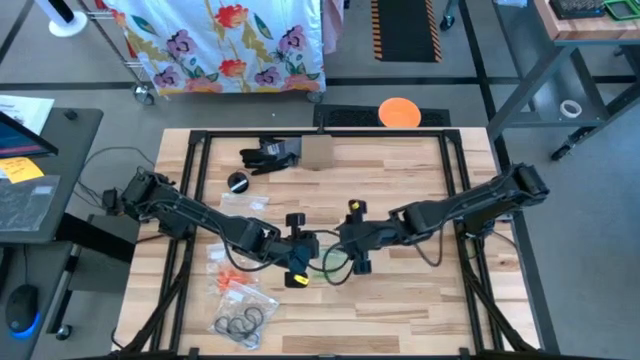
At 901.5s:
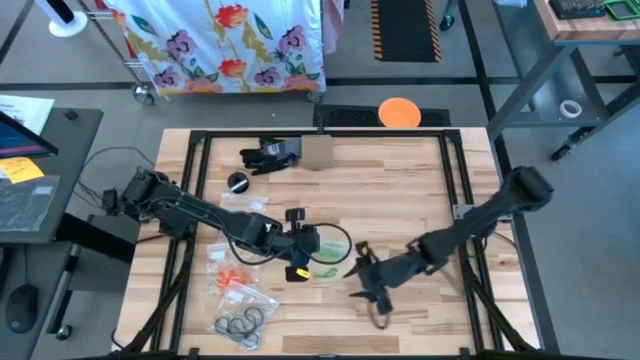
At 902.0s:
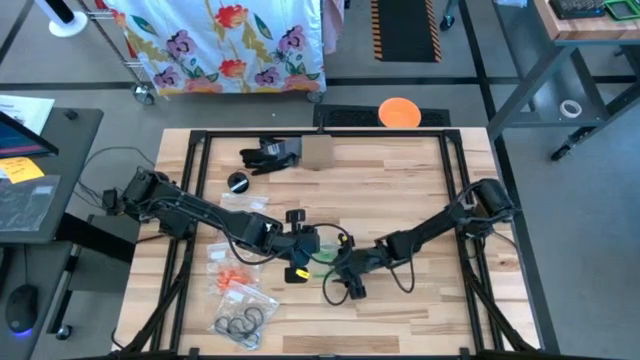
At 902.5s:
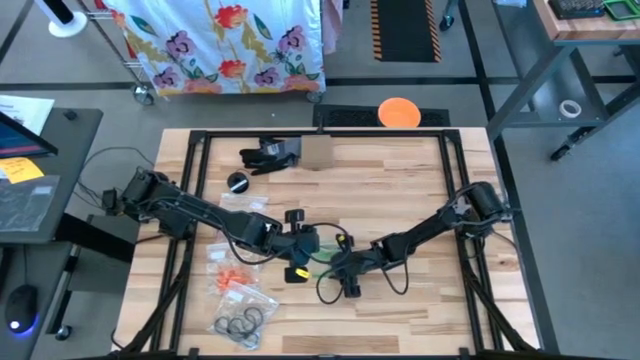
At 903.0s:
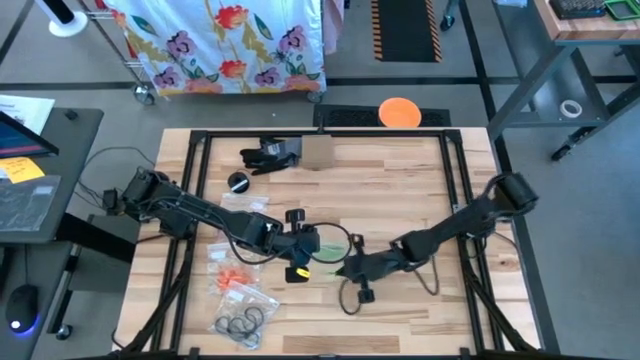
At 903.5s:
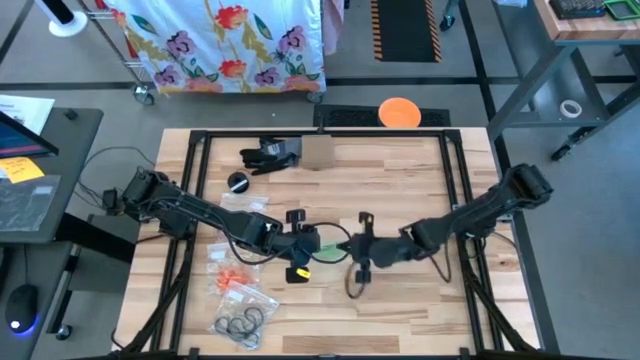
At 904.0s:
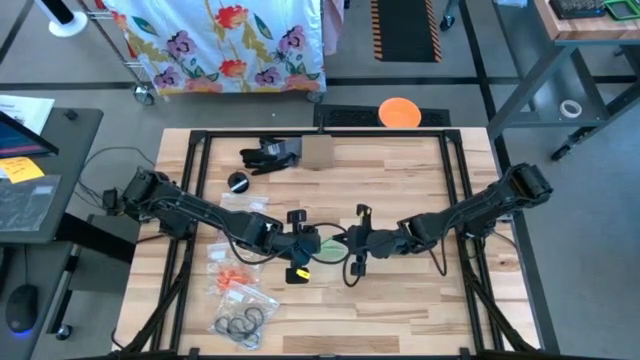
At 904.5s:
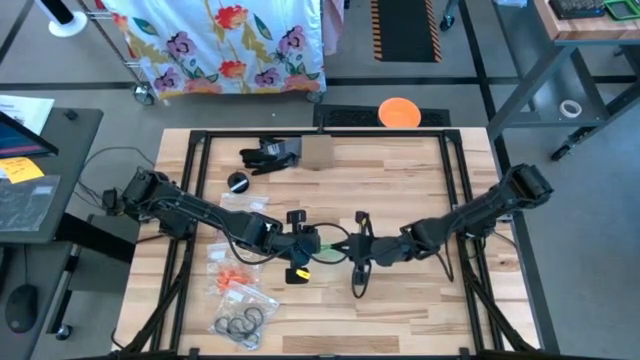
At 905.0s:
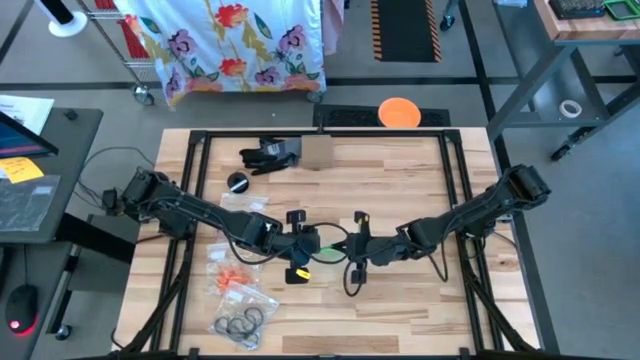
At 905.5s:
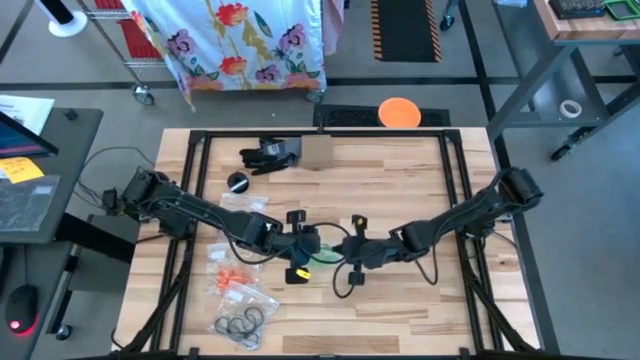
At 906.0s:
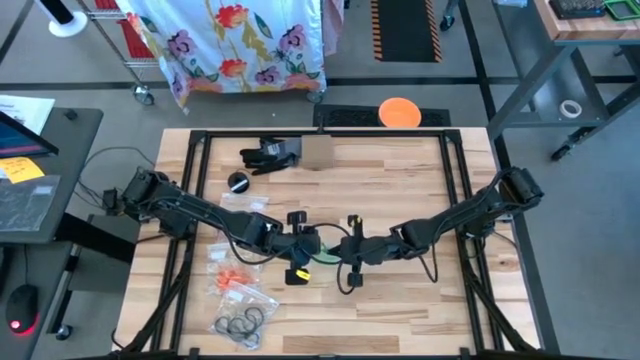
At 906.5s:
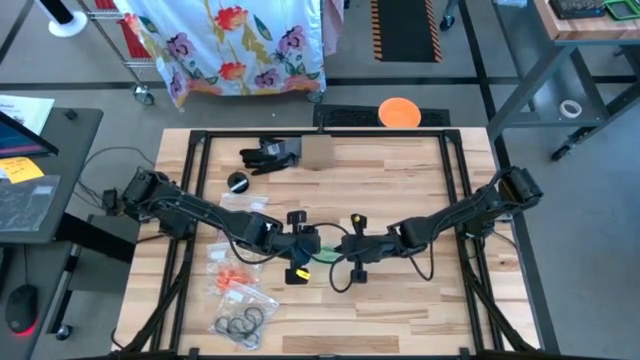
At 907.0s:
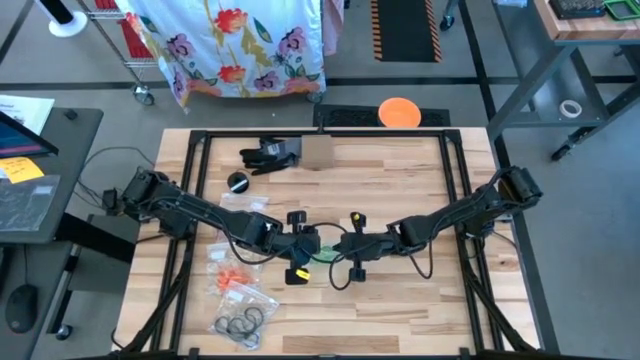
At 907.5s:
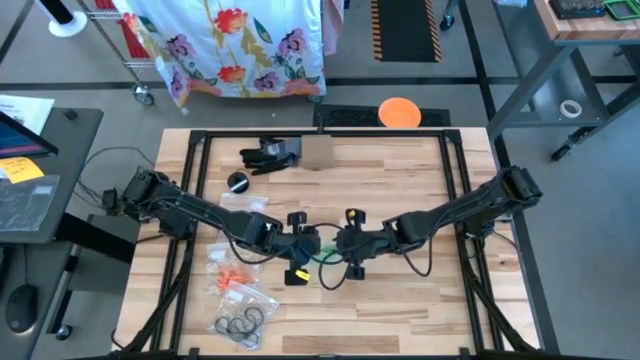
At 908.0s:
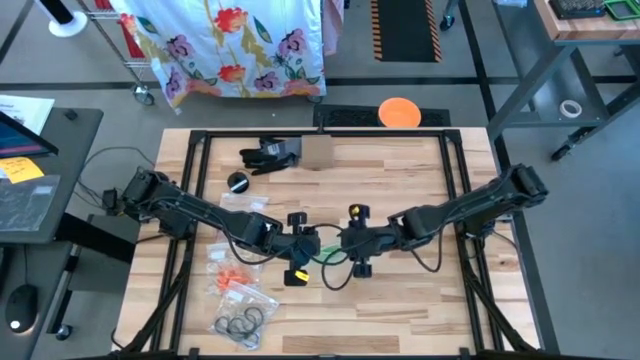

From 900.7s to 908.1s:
Task: Sort rubber bands
Put the green rubber band into the transparent zip bag

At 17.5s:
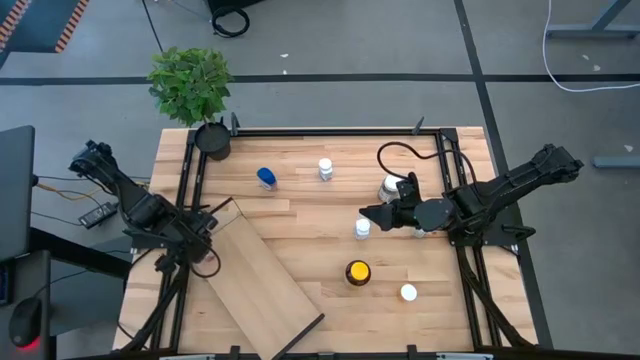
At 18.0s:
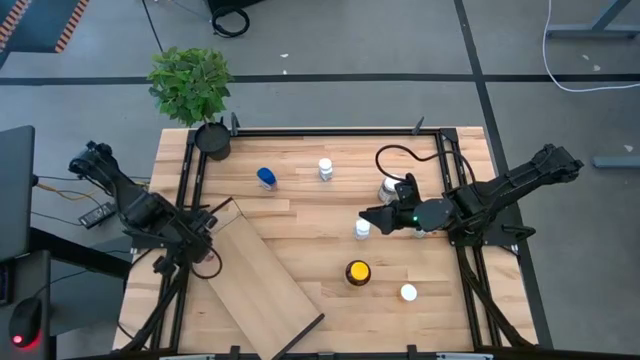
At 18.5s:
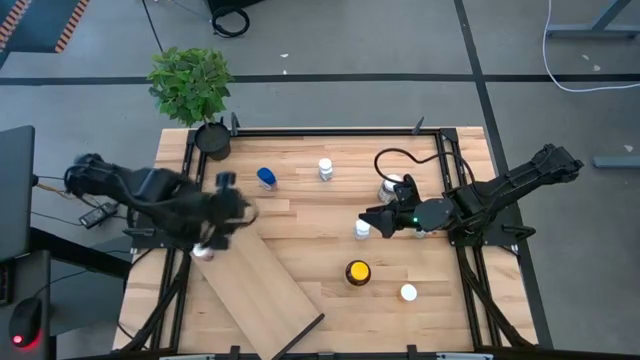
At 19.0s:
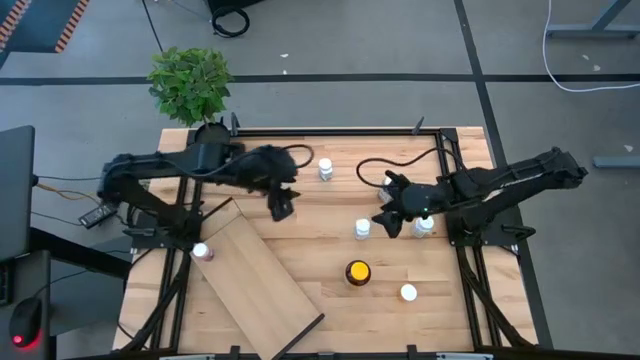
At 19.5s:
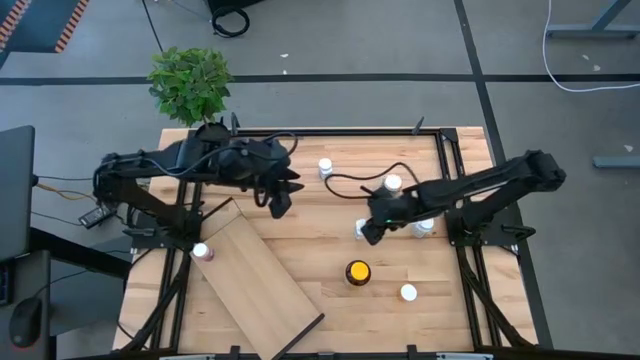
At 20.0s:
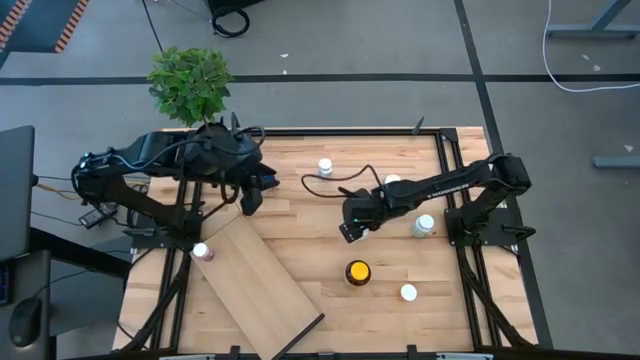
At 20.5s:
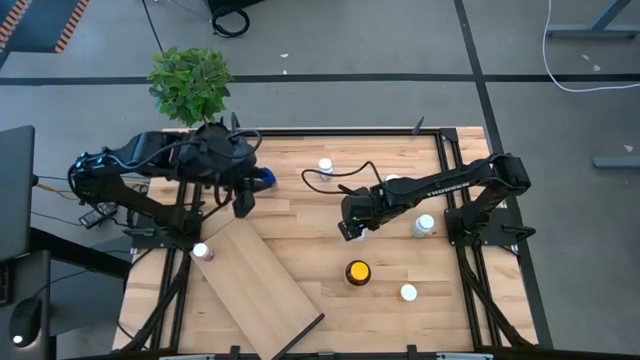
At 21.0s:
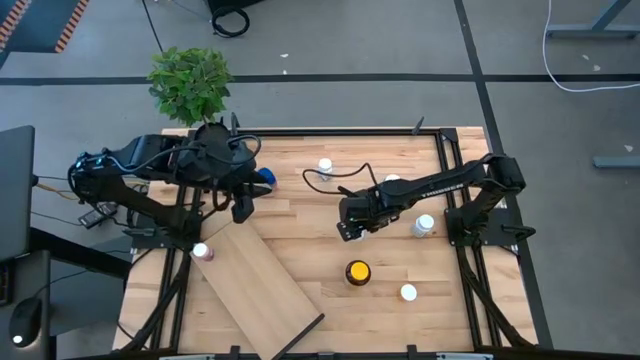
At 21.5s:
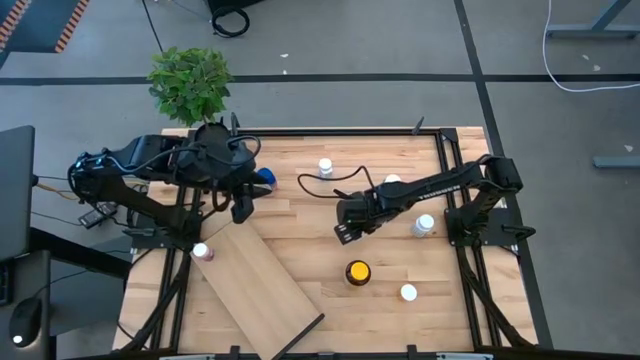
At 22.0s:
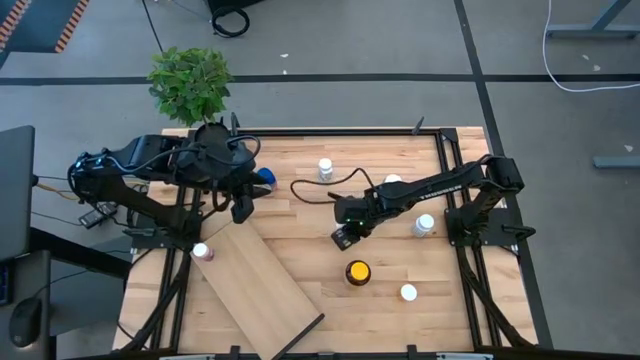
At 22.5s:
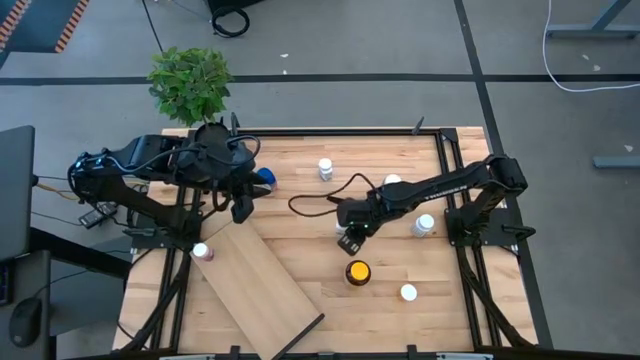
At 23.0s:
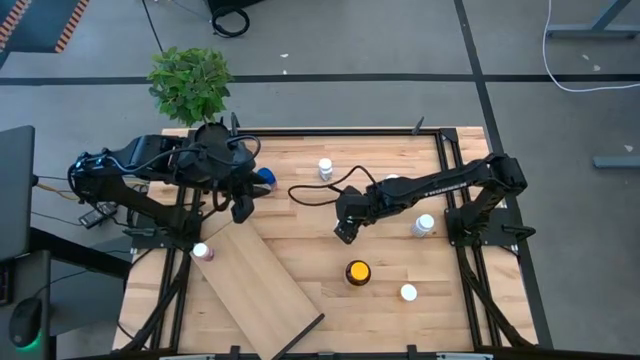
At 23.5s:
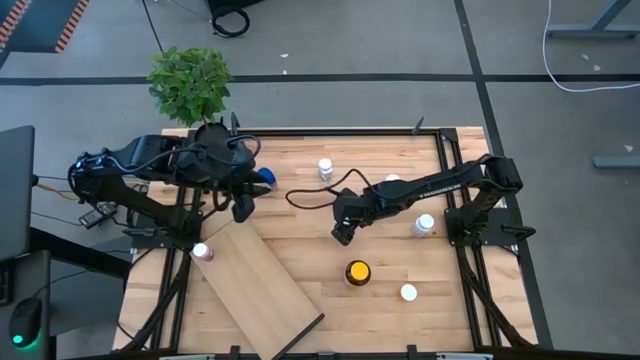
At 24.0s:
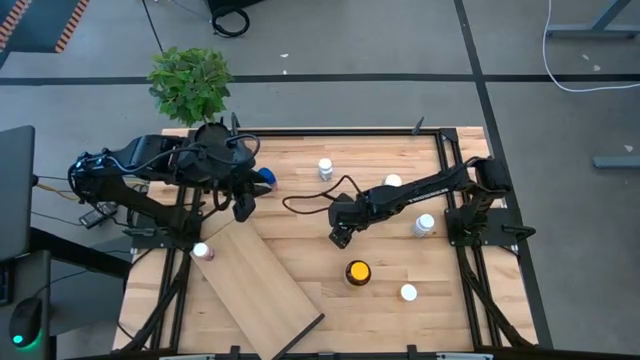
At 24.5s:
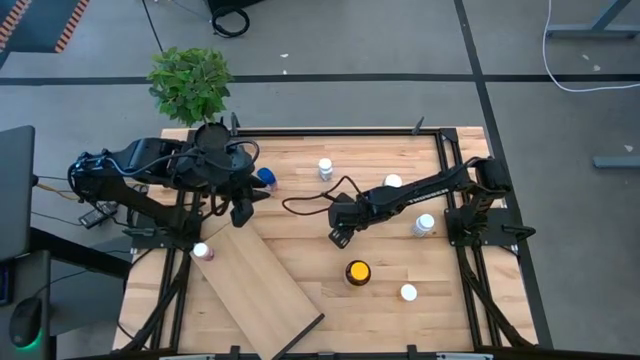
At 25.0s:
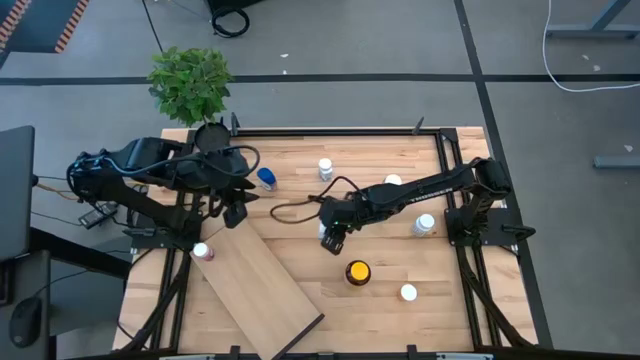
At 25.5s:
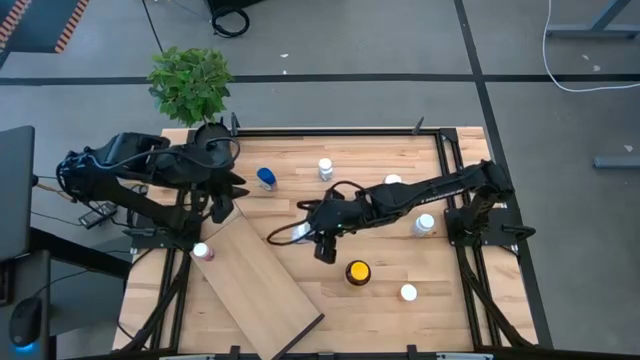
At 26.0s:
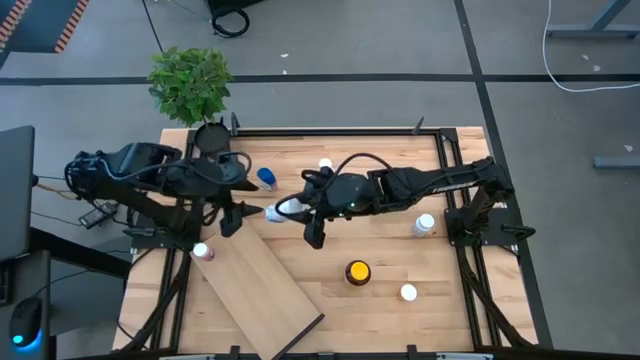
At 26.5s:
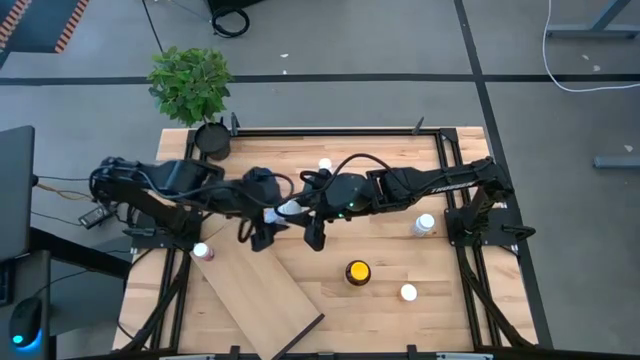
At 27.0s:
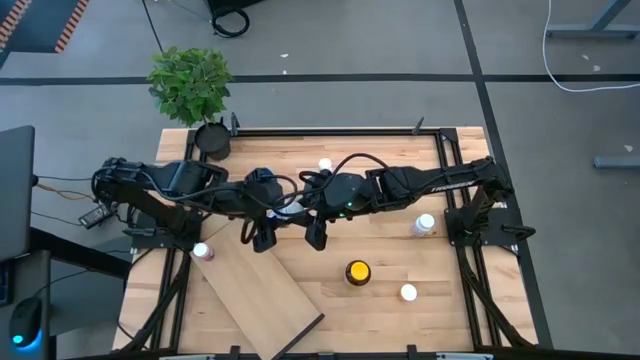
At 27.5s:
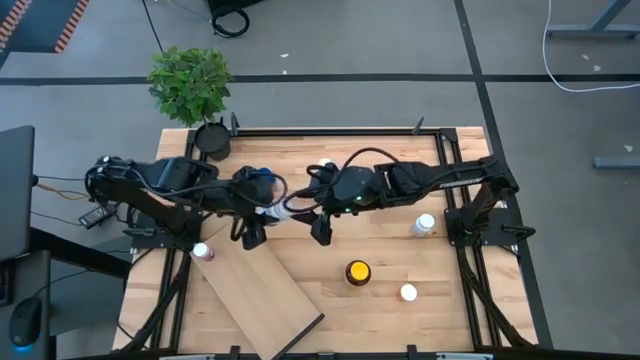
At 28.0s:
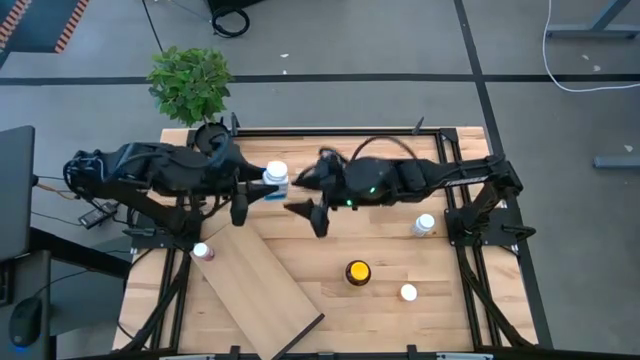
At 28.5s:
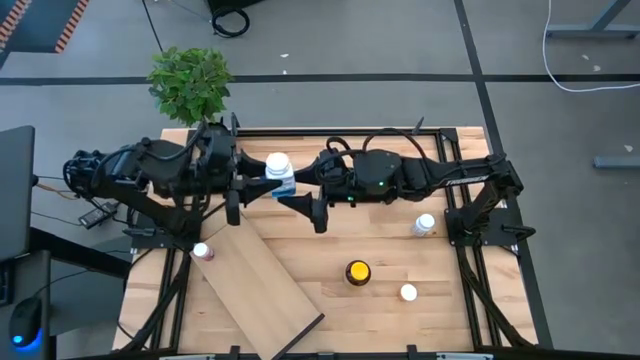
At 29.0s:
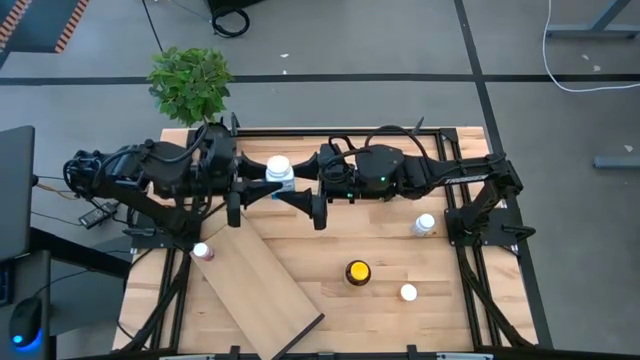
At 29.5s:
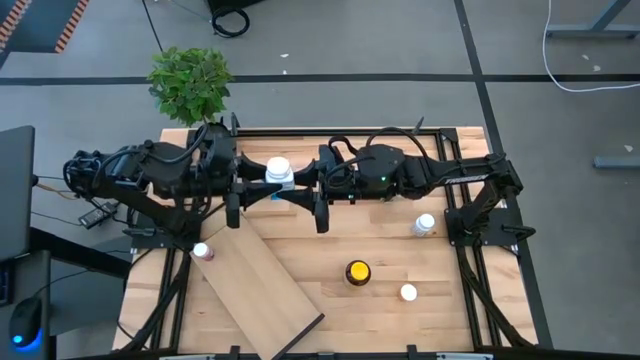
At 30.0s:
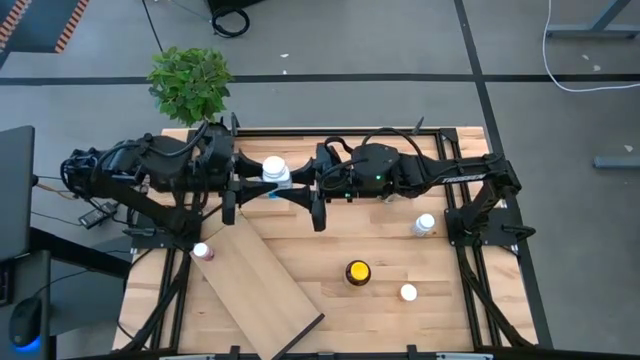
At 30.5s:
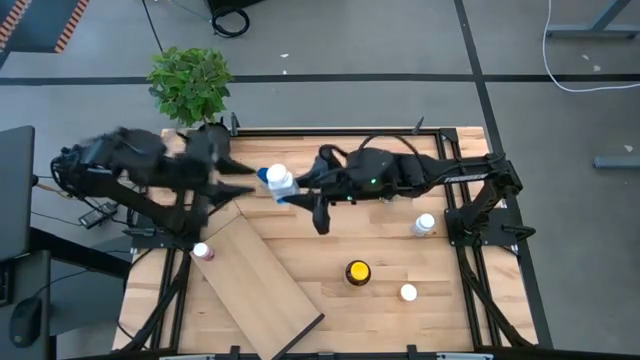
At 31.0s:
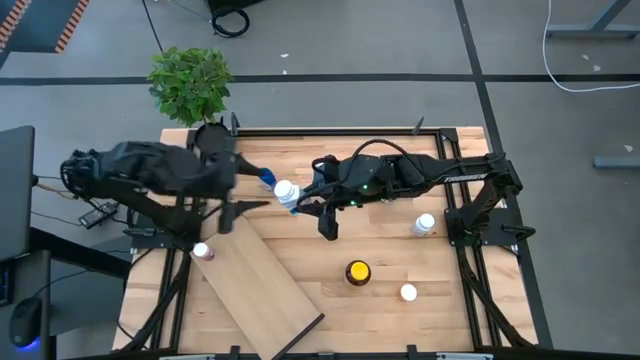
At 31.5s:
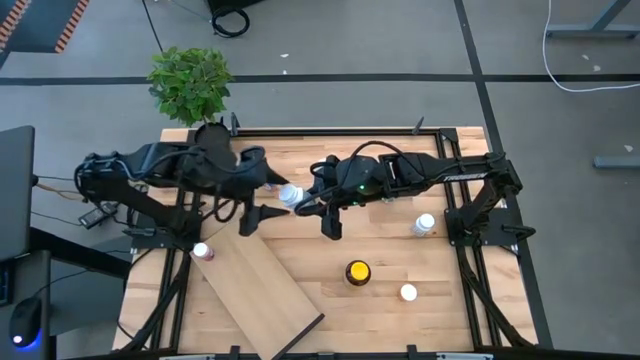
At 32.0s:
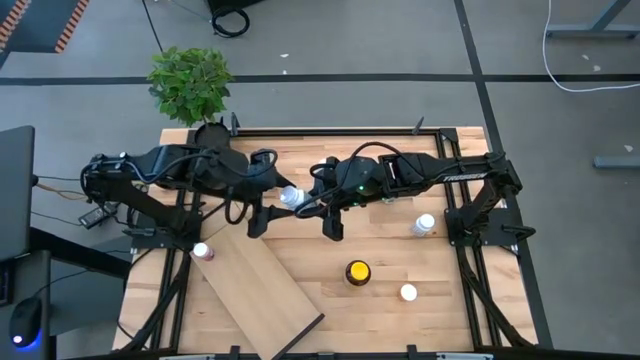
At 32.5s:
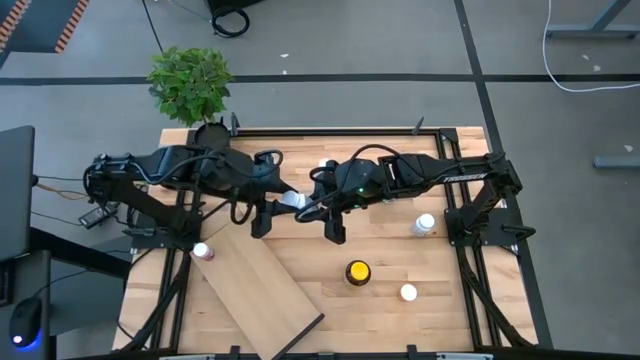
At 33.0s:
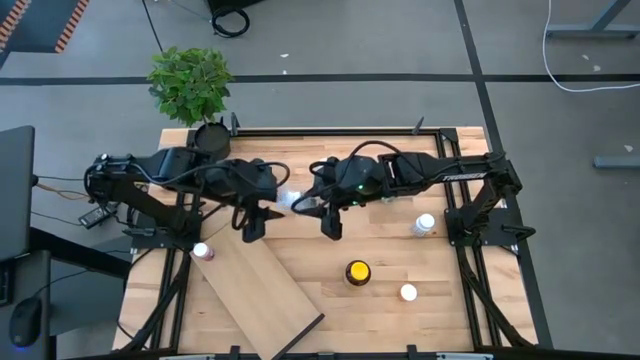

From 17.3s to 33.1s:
Task: Pick and place medicine bottles onto shelf by color
Put the left white pill bottle on the shelf
